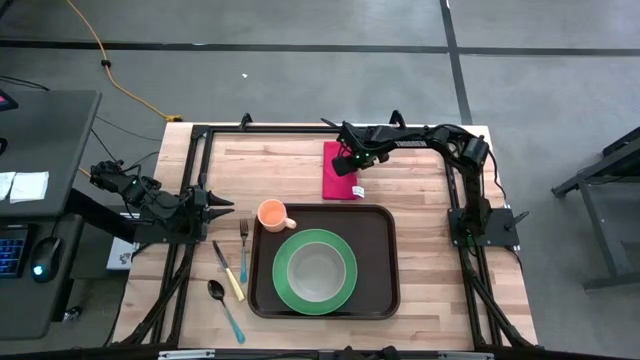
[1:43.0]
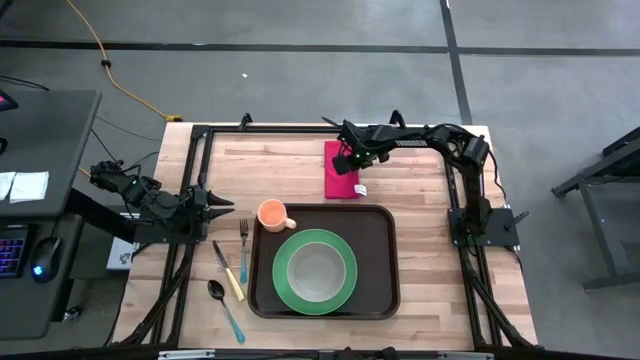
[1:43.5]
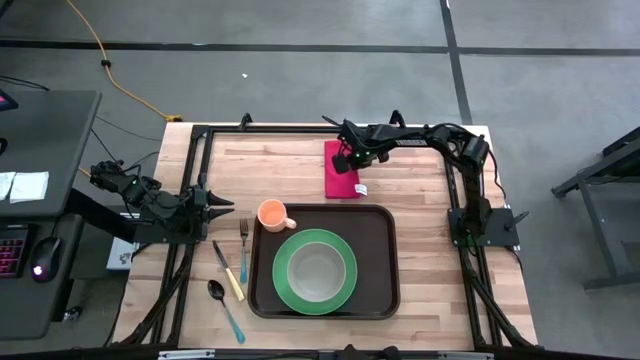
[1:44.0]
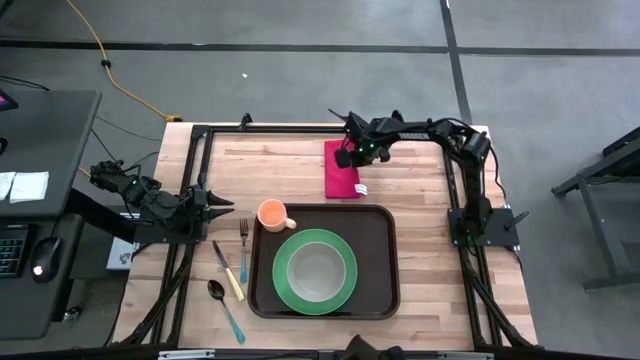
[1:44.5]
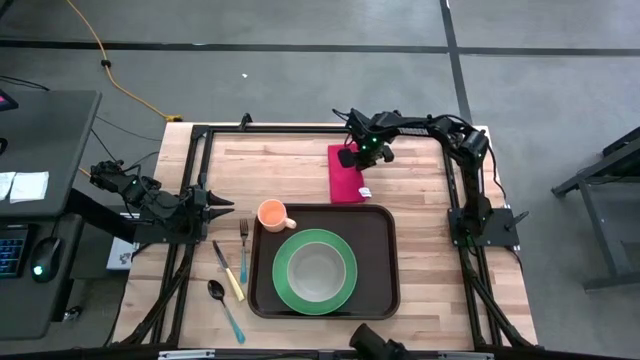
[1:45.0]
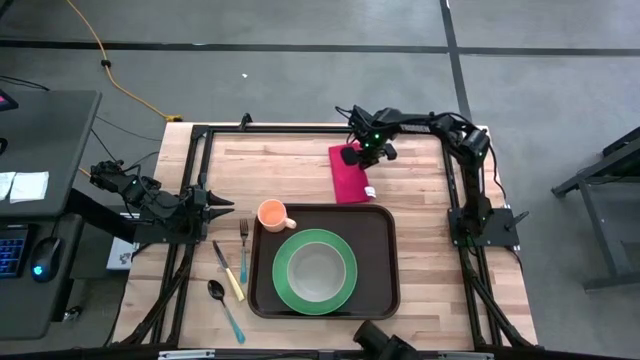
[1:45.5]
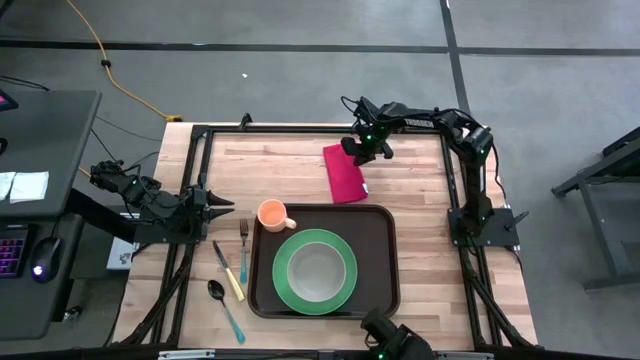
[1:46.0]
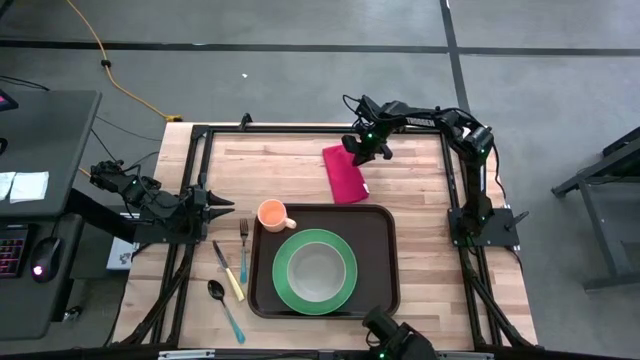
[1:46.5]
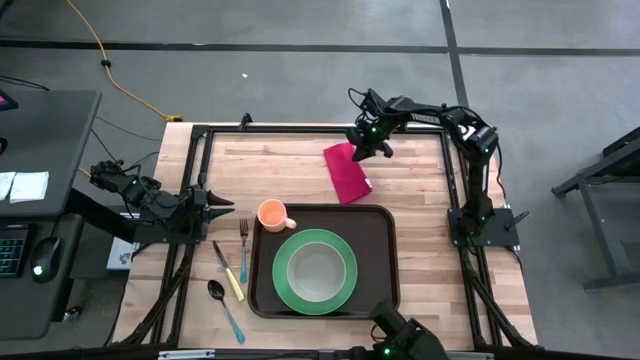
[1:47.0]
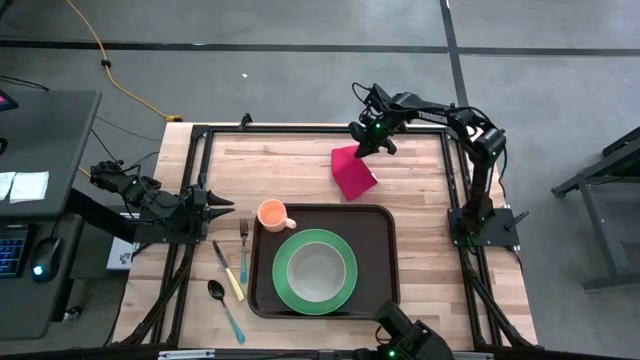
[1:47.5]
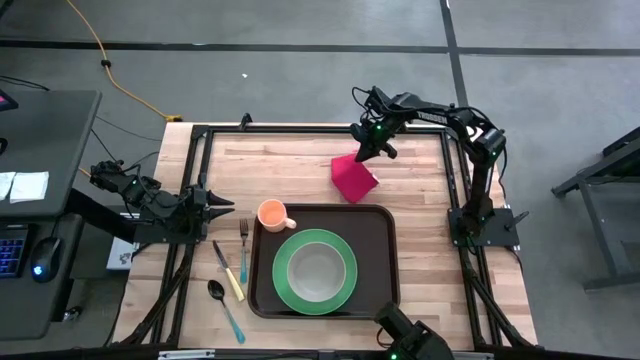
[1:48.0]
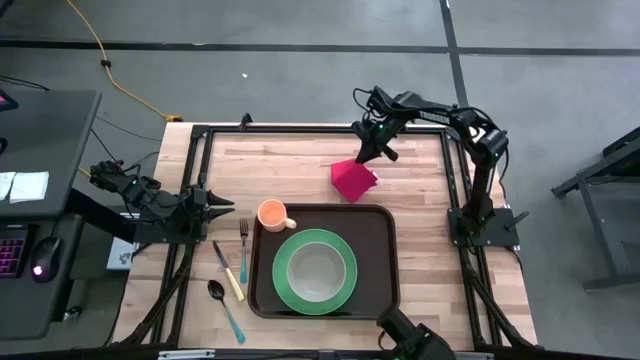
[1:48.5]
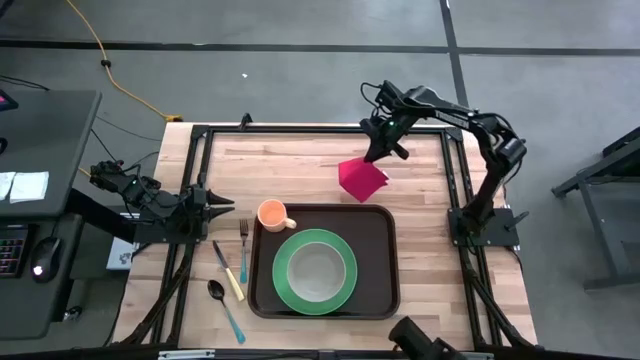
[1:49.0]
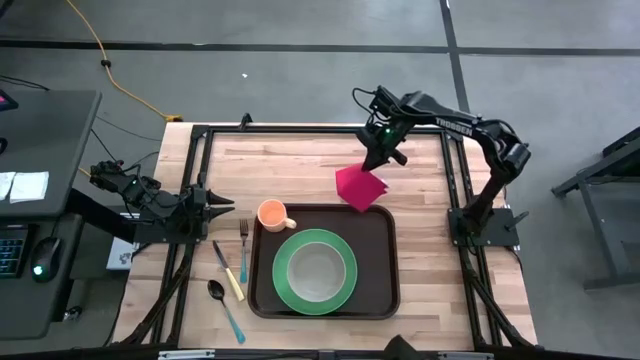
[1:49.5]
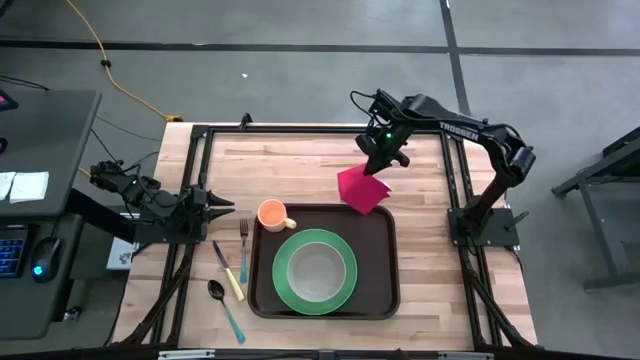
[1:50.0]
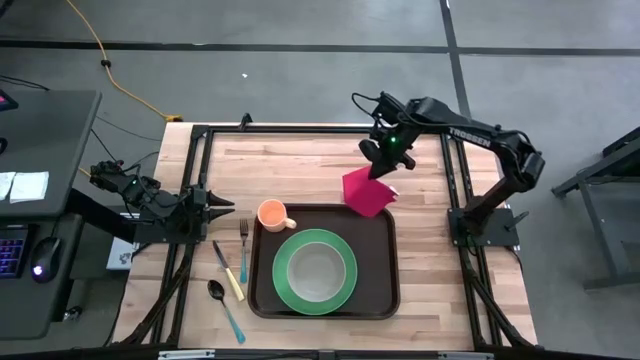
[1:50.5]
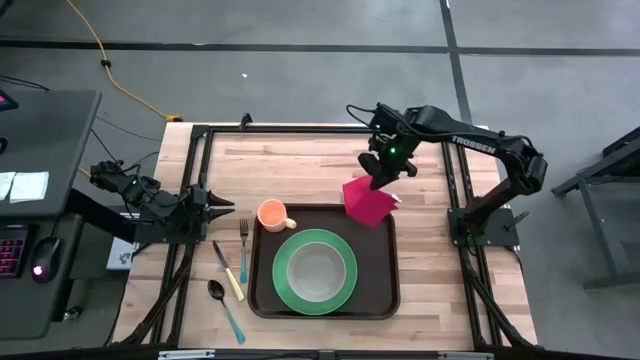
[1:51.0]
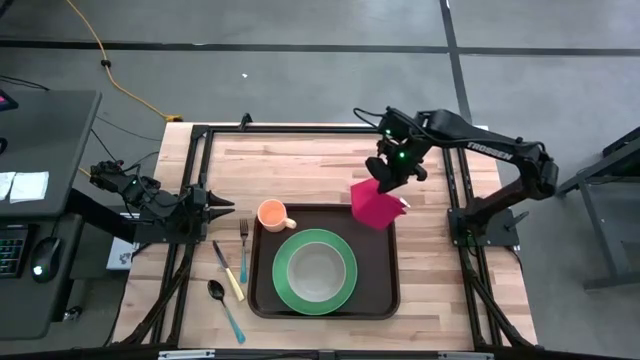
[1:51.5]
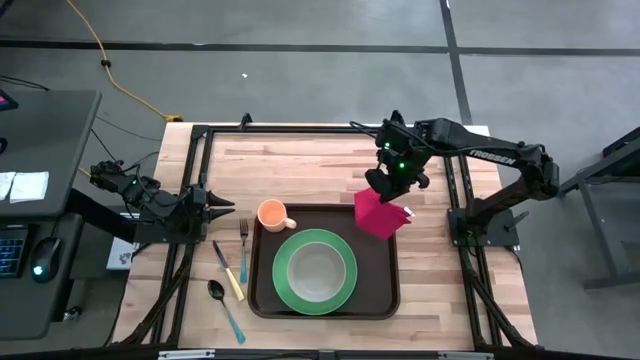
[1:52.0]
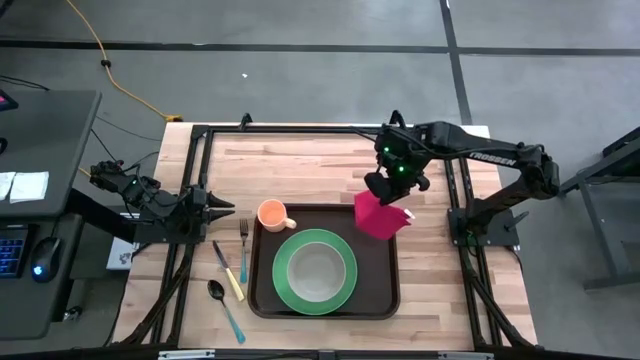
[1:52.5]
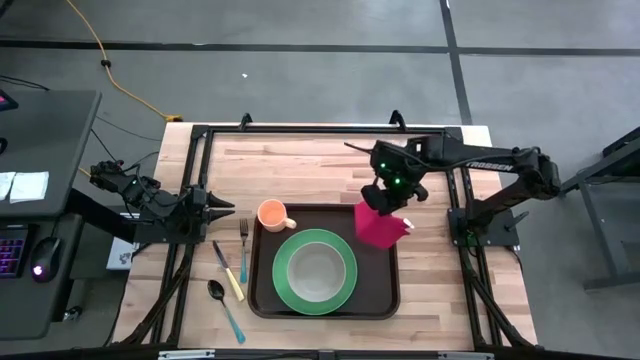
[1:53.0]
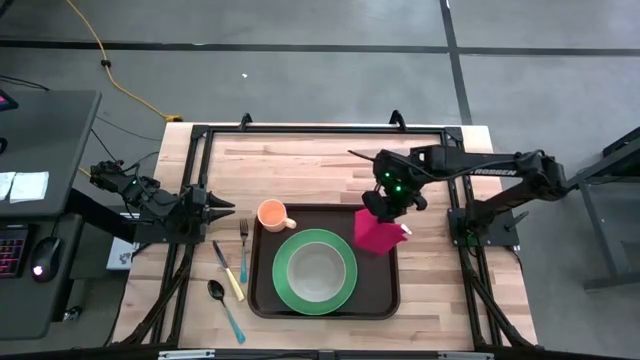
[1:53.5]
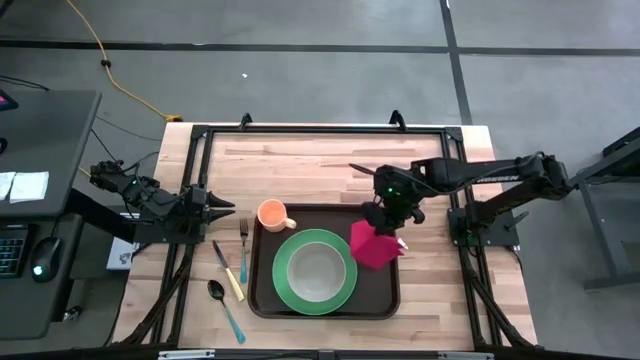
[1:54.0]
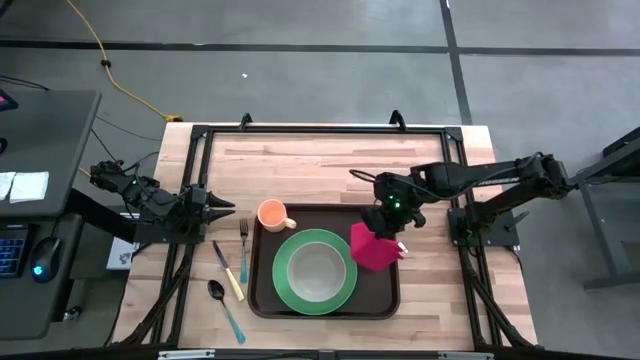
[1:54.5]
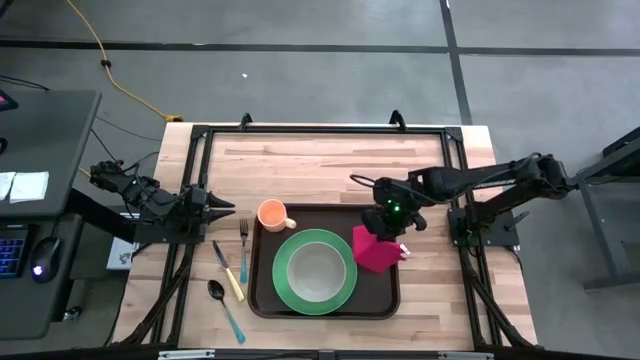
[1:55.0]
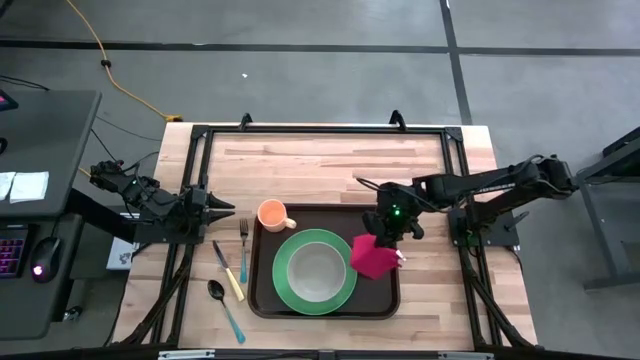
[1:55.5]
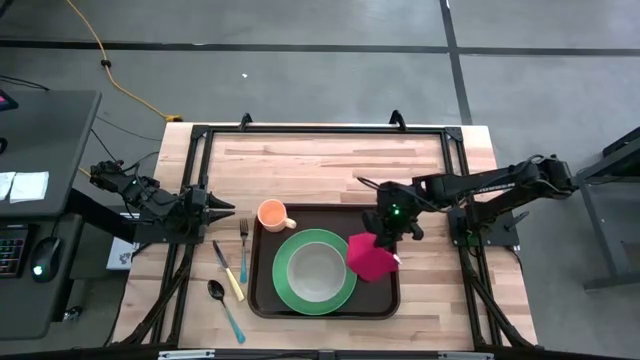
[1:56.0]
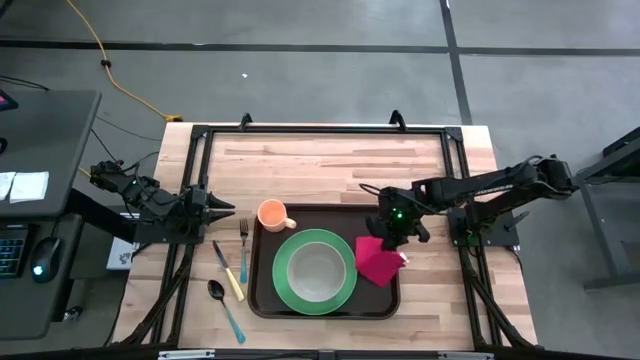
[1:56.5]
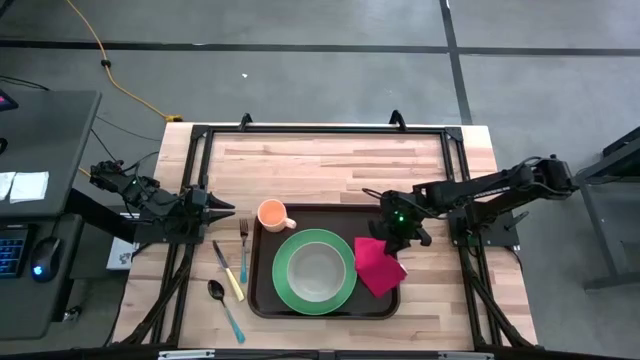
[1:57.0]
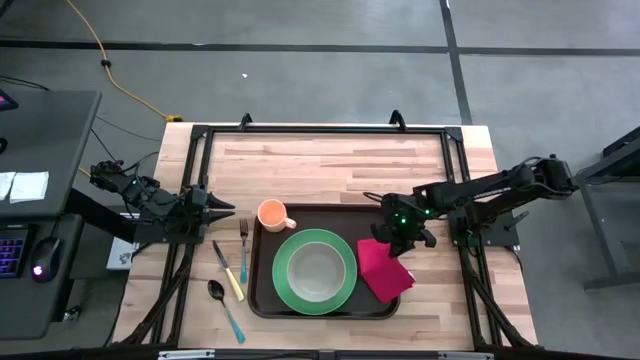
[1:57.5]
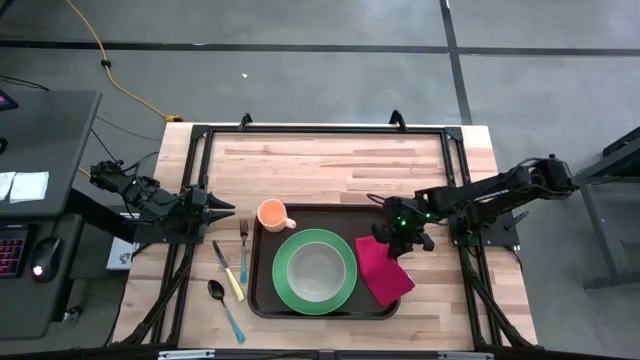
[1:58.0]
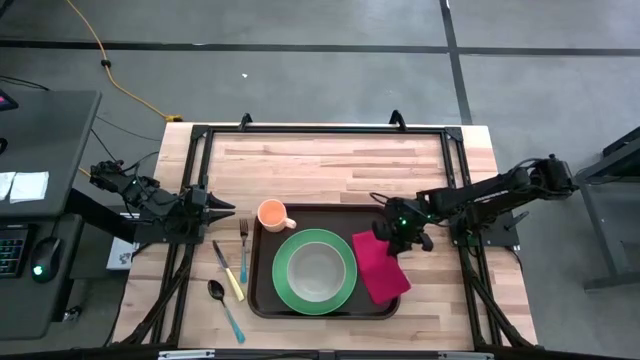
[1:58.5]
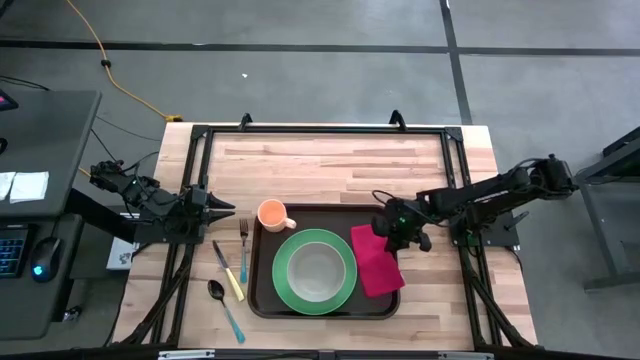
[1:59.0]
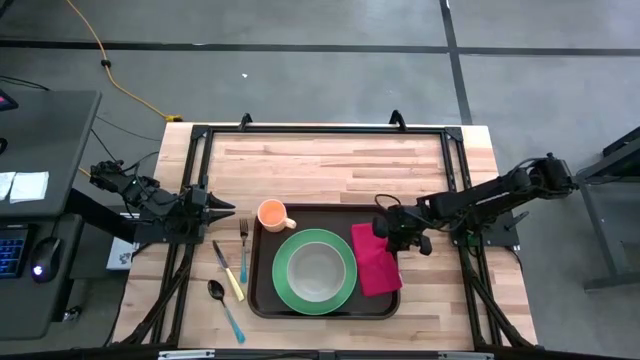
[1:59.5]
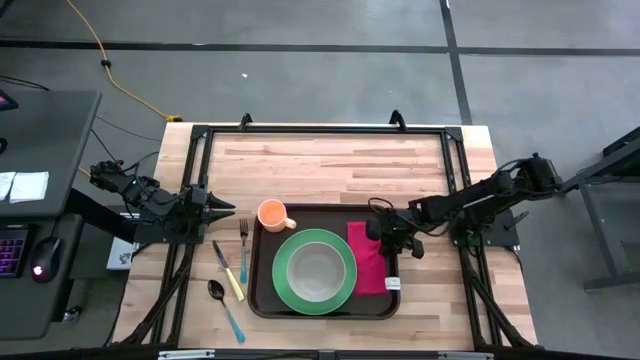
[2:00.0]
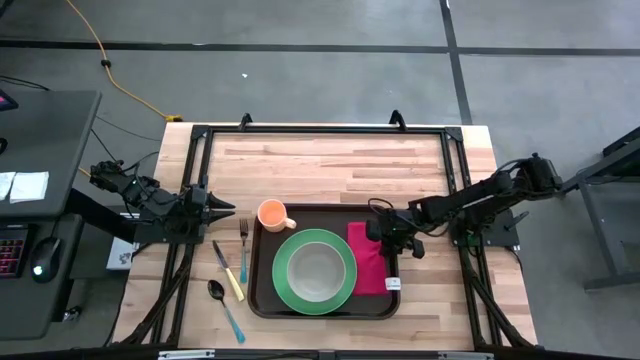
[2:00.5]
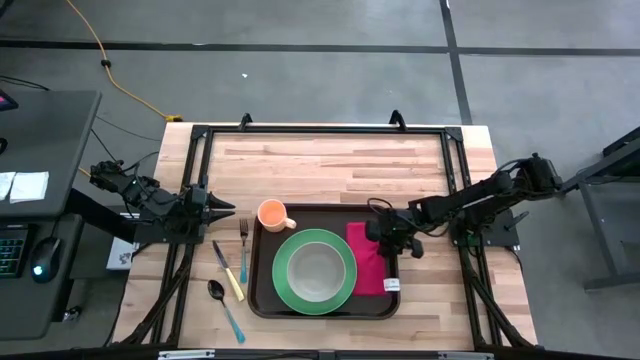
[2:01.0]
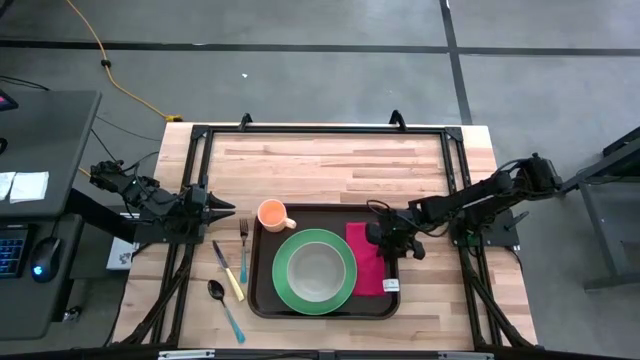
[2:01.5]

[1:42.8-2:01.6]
Task: Set up tray
Put the red table napkin on the black serving tray to the right of the green plate

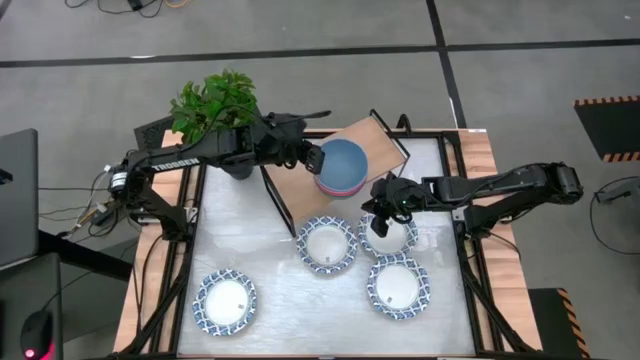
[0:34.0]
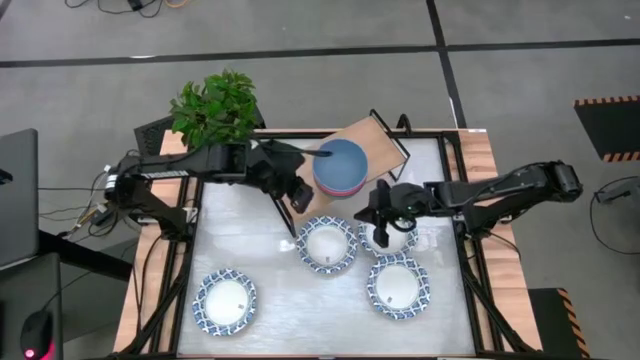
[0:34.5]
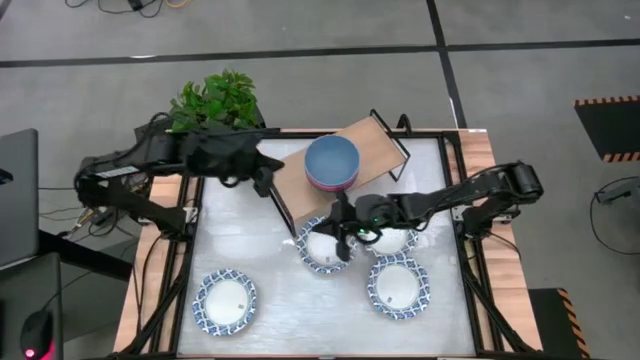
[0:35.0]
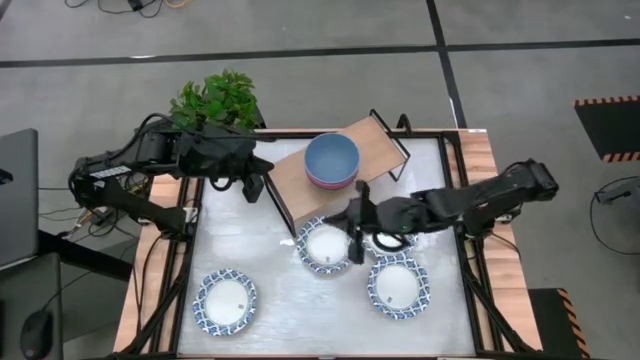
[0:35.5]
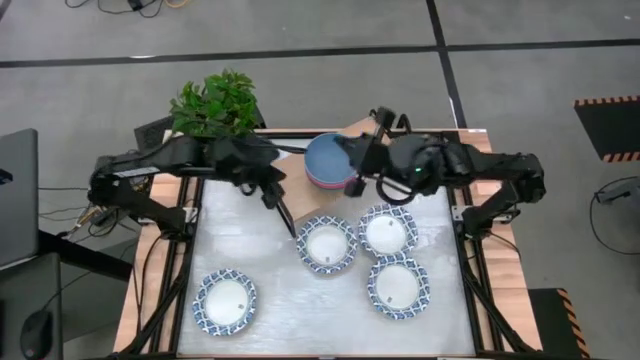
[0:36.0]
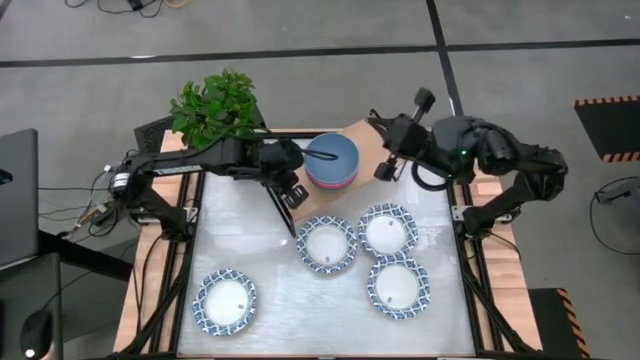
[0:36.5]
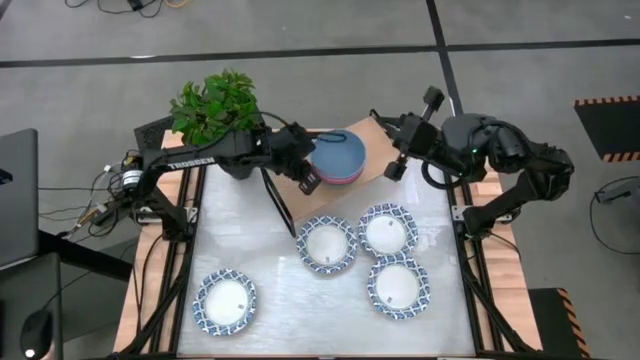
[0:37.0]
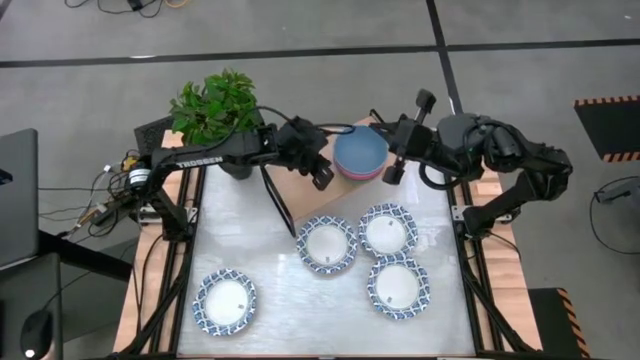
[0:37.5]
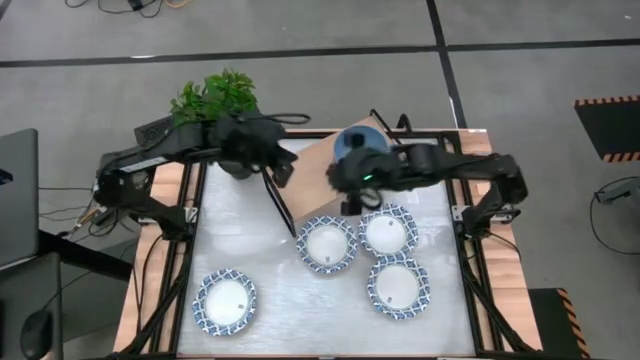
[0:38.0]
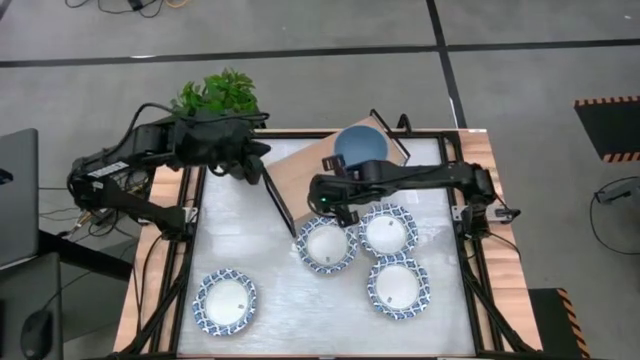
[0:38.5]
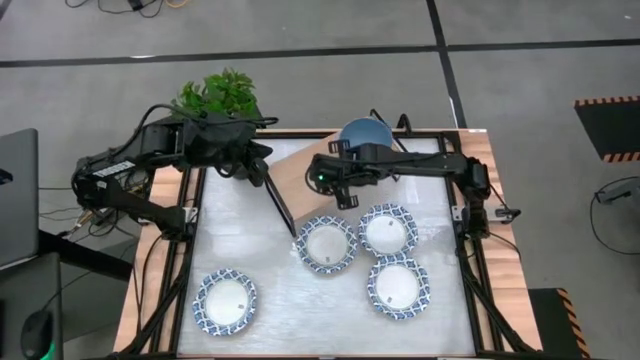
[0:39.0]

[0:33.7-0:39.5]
Task: Place and stack bowls onto a shelf
Move the stacked bowls to the right side of the shelf
